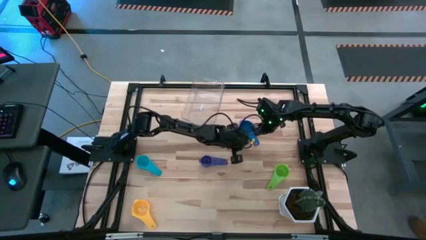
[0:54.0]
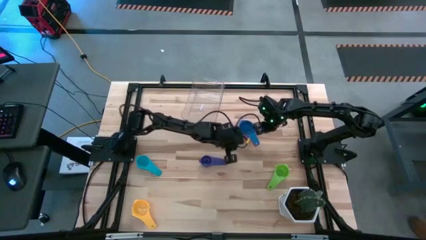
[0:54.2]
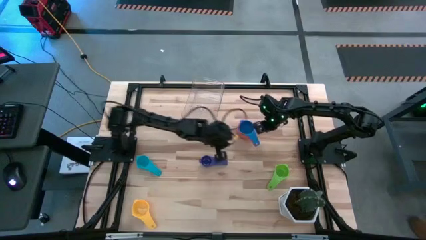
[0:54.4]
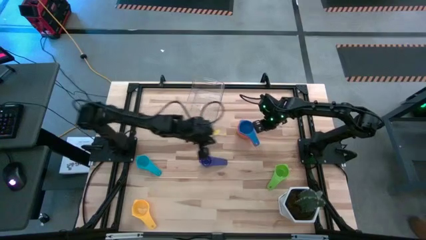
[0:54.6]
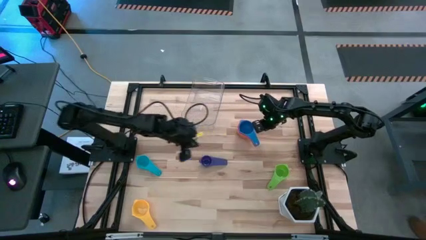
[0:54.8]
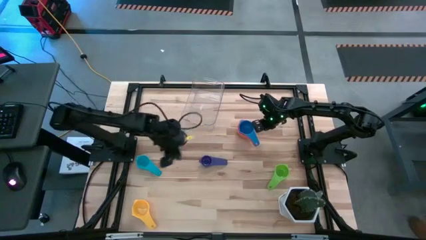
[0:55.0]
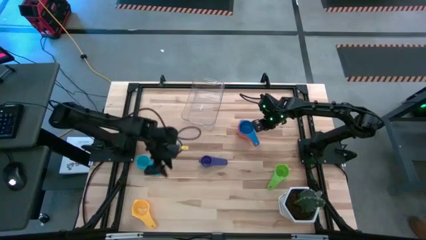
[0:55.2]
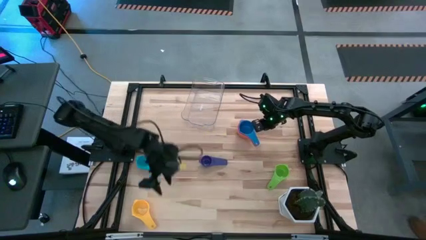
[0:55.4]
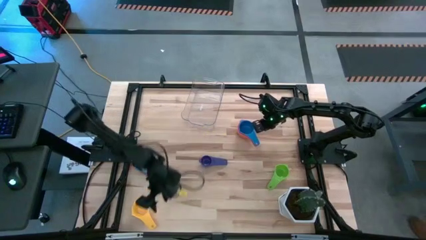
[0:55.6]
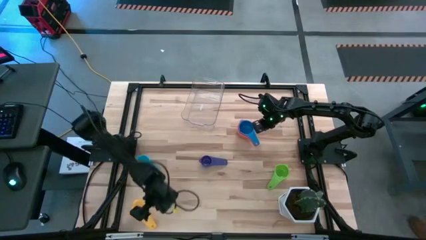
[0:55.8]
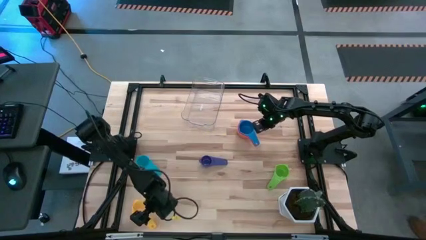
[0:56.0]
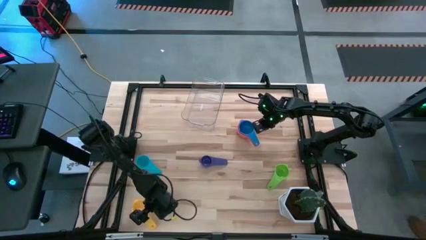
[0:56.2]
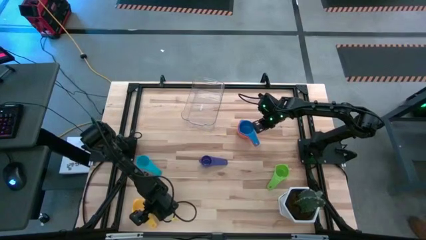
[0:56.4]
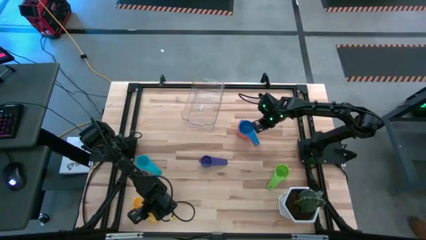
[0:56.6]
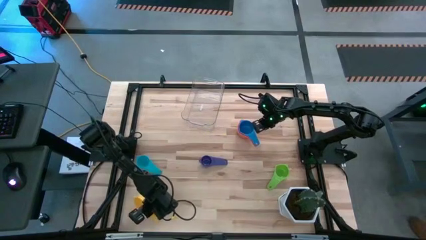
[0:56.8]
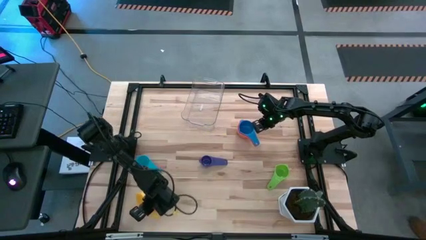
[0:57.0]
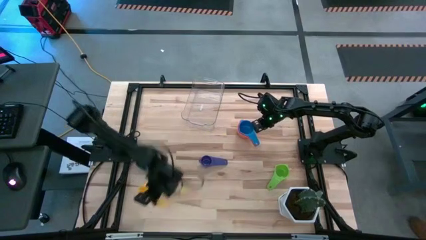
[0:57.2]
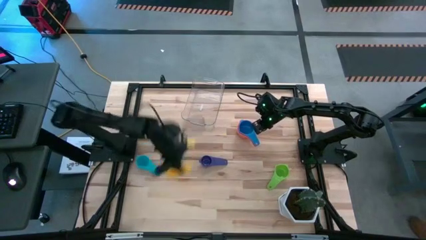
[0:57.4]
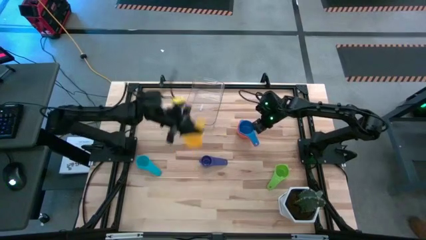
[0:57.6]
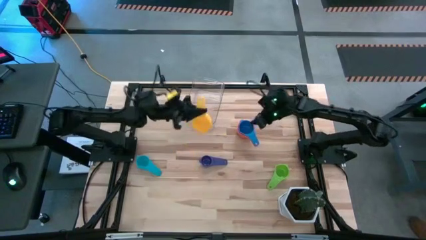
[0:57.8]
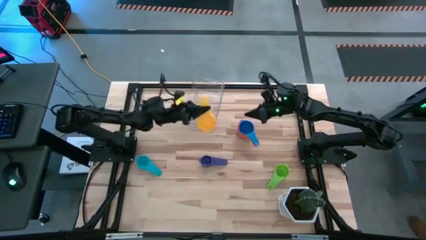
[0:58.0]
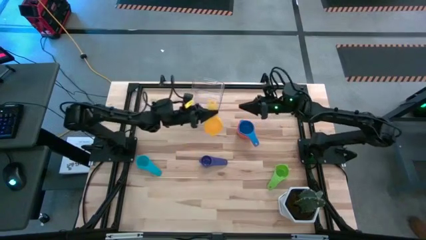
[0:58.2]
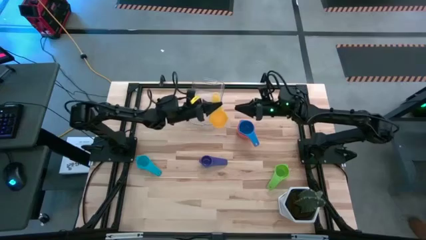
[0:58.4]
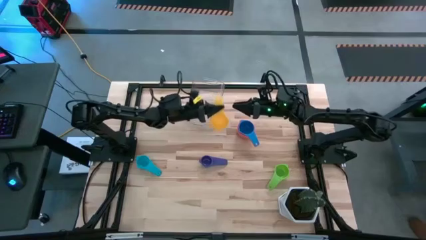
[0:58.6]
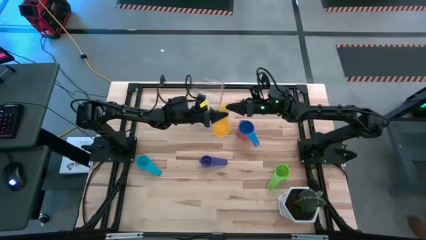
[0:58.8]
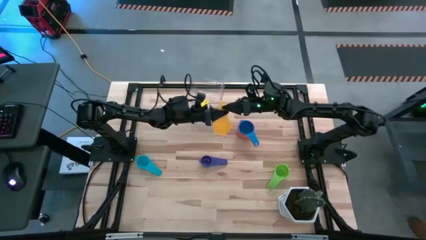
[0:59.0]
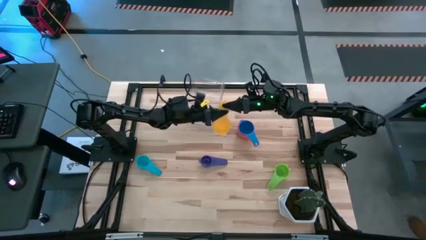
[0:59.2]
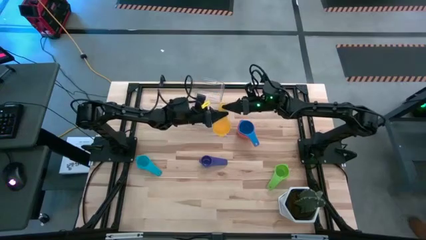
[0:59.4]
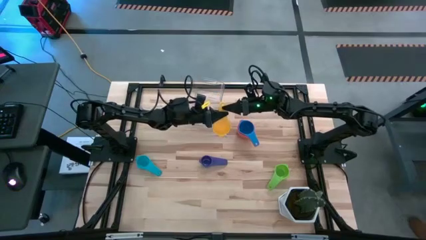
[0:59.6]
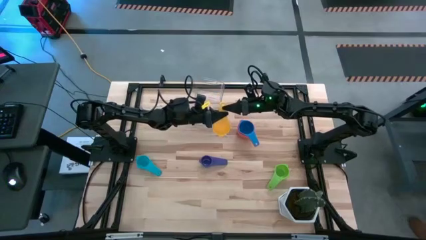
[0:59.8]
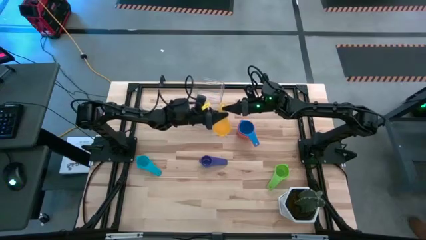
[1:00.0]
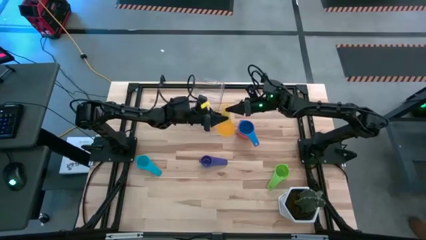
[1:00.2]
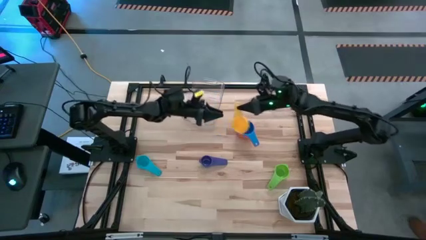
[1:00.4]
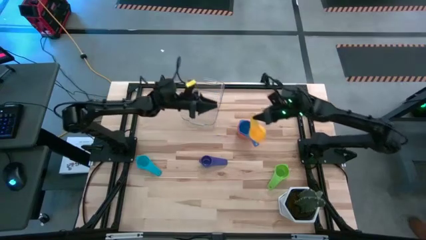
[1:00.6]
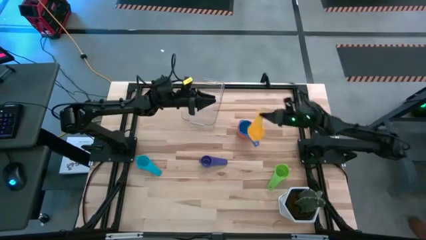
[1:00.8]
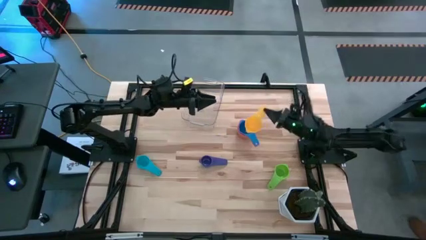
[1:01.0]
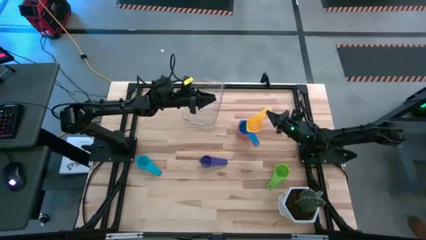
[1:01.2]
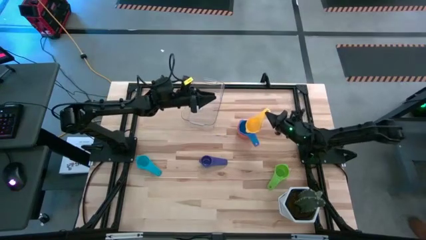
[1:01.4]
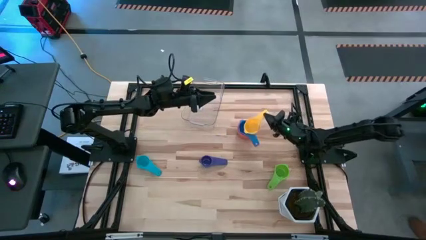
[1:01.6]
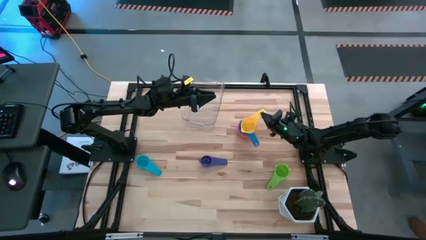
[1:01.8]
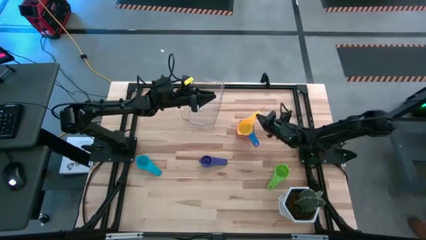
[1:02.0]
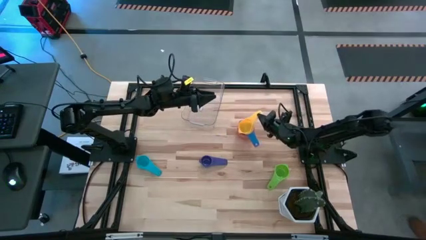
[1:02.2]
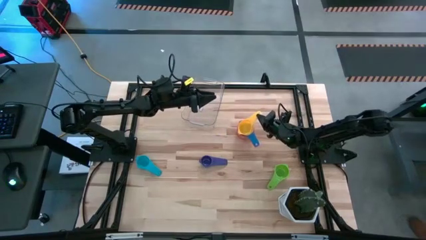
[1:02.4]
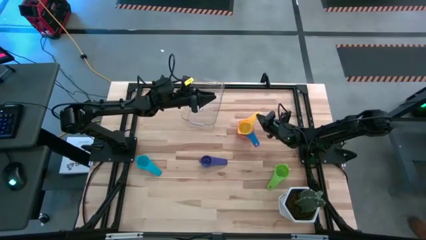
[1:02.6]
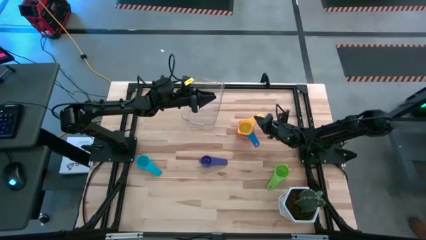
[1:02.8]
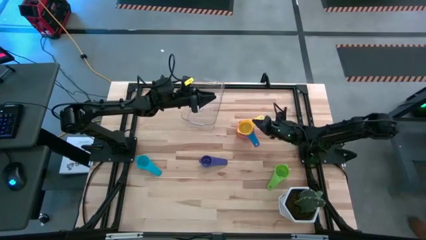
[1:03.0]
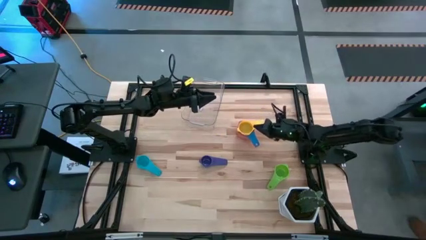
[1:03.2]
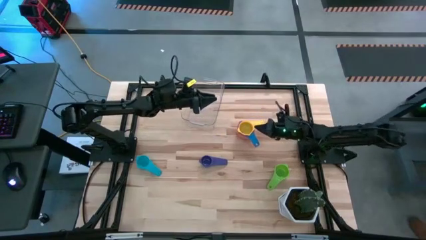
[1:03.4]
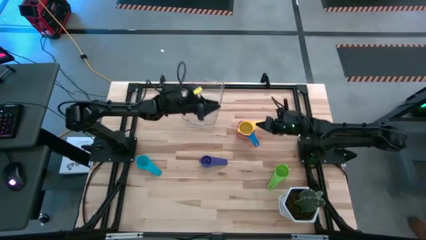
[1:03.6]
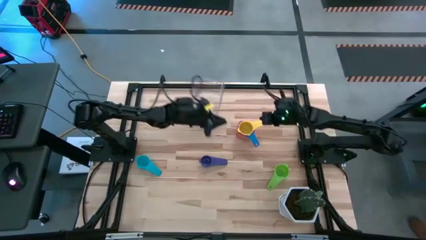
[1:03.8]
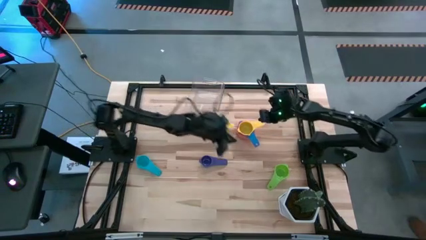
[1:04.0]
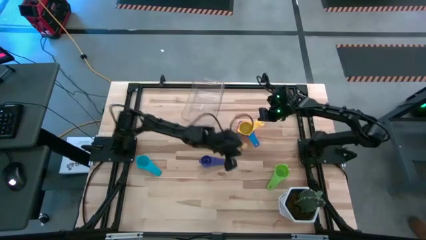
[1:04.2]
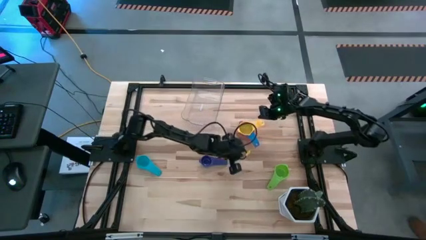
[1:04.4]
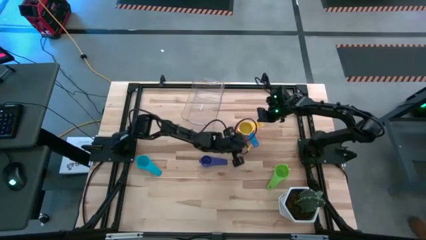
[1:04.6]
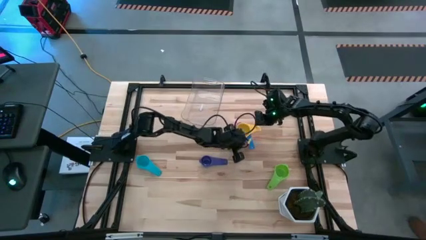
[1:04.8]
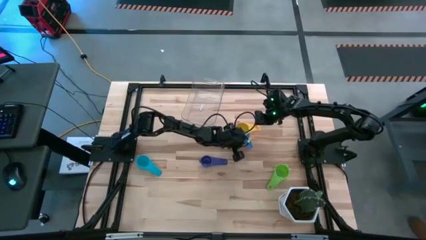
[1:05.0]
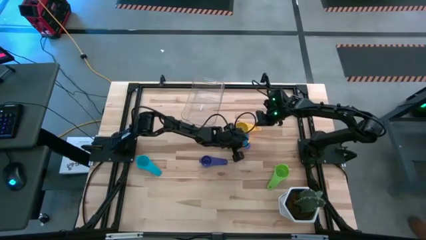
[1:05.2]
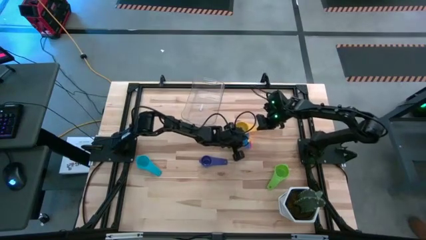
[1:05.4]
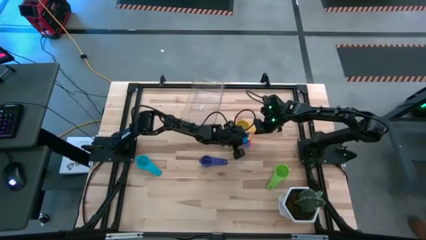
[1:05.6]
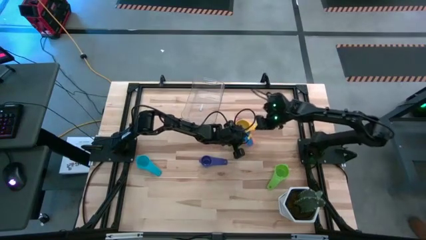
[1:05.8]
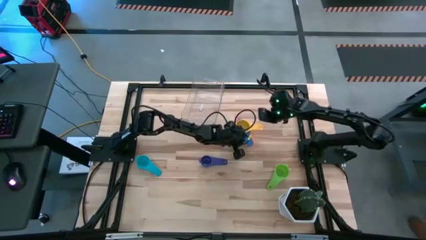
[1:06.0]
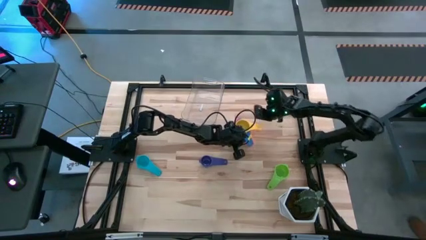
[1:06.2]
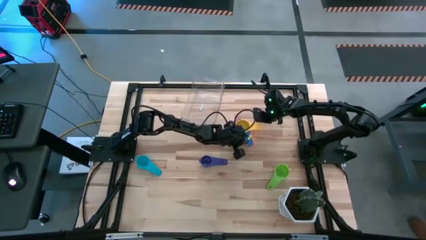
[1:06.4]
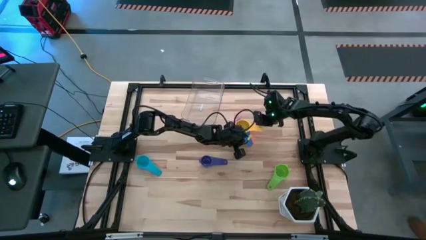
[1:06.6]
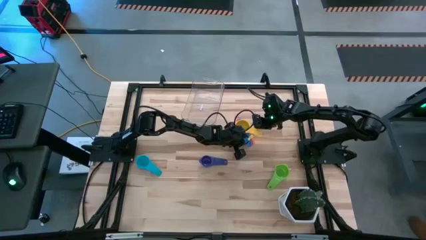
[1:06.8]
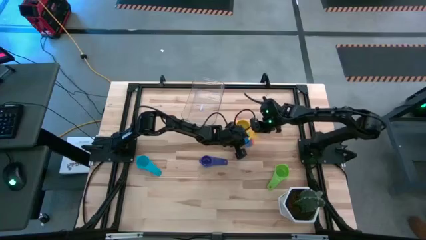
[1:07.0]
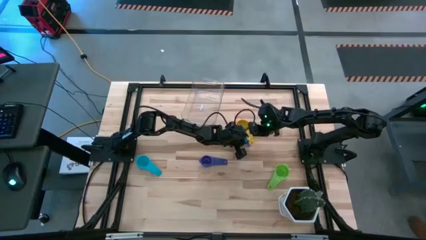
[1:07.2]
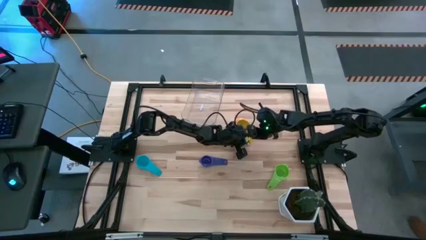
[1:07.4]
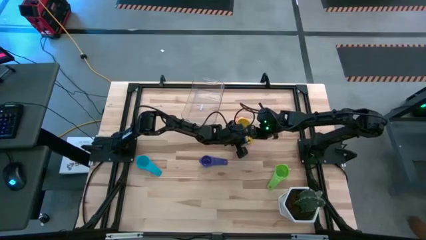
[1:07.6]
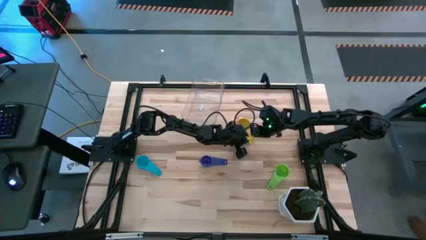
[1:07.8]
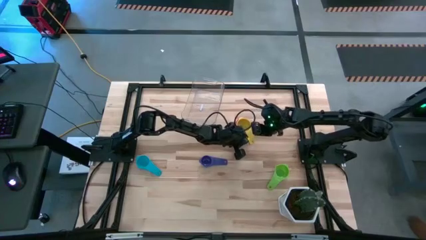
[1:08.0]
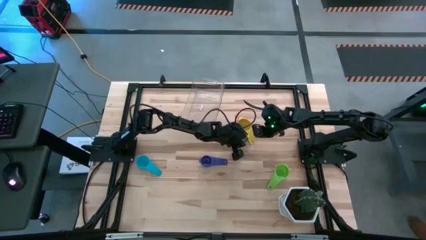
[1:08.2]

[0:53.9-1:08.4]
Task: Nest measuring cups in basket
Stack the yellow measuring cup on top of the blue measuring cup
